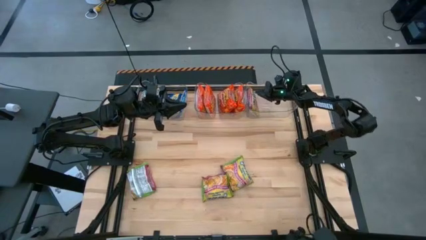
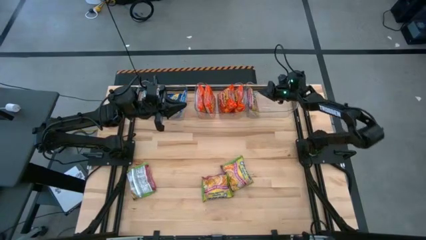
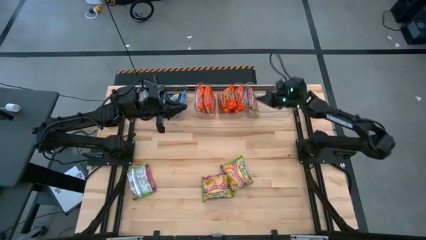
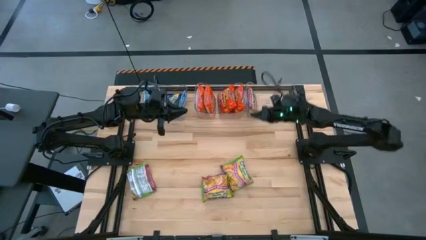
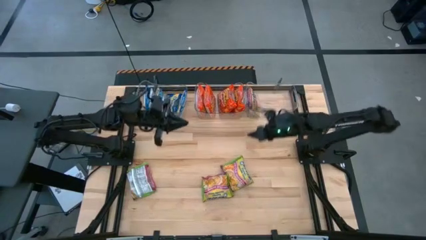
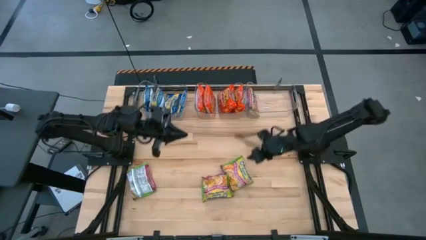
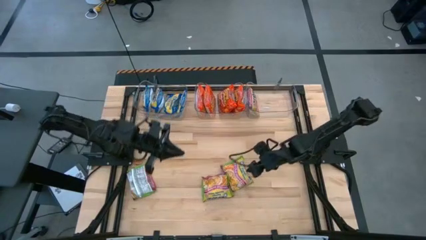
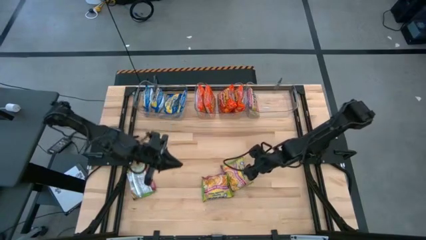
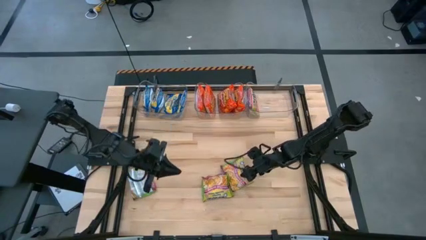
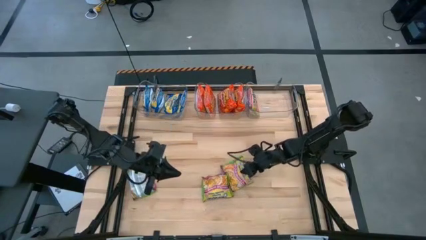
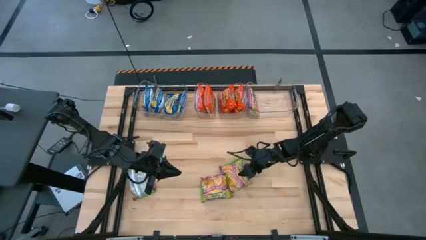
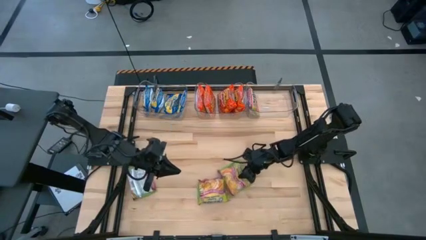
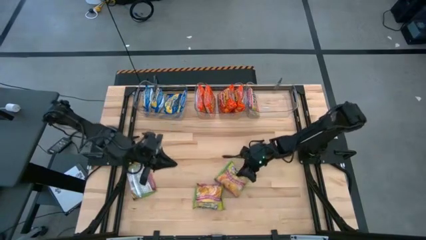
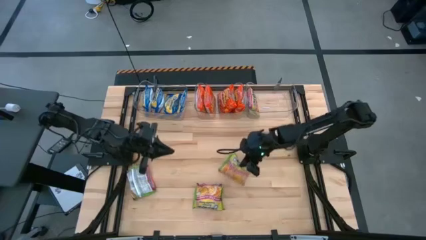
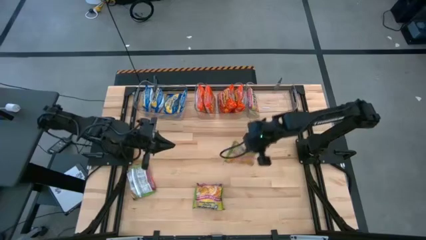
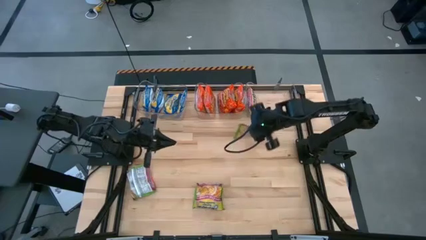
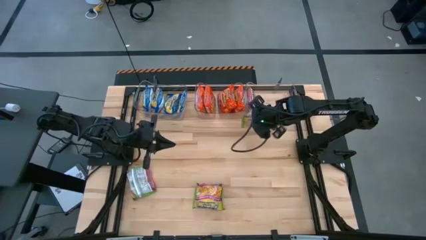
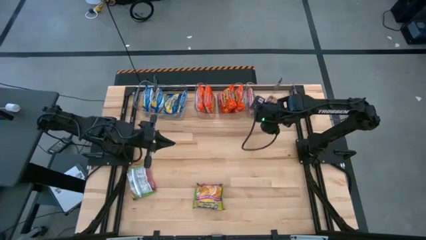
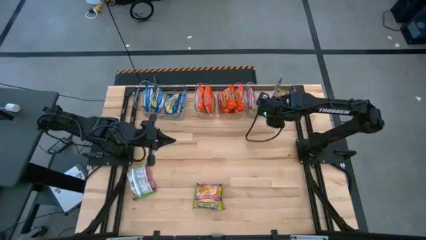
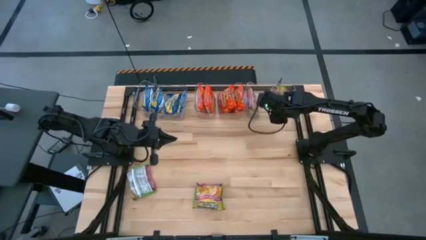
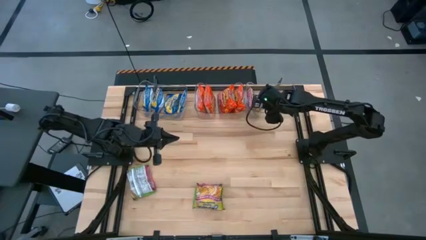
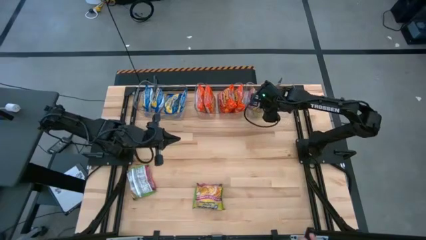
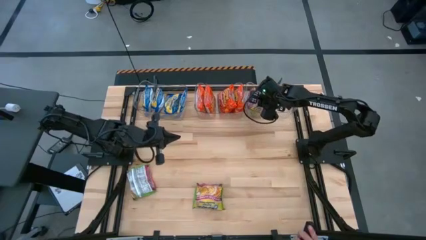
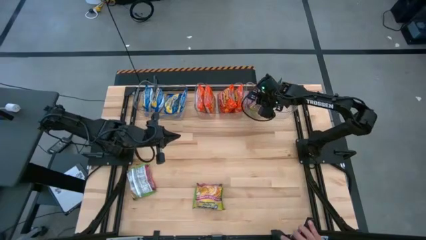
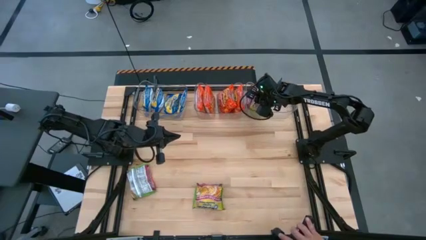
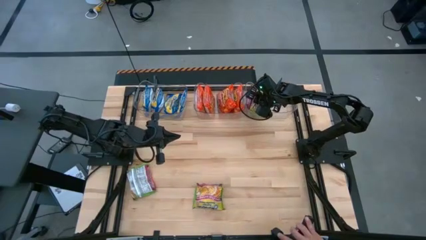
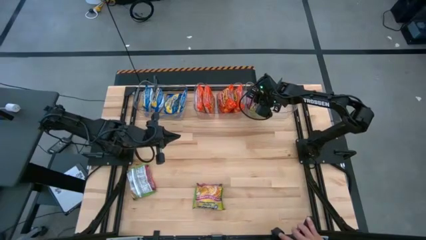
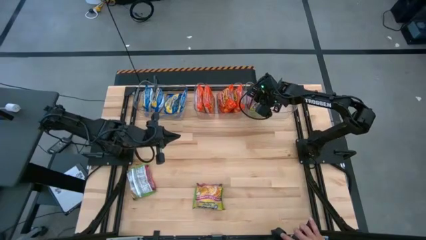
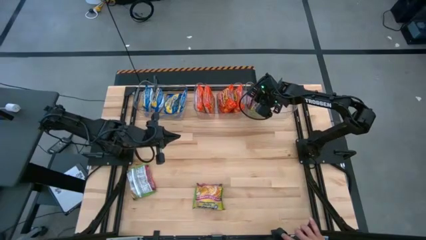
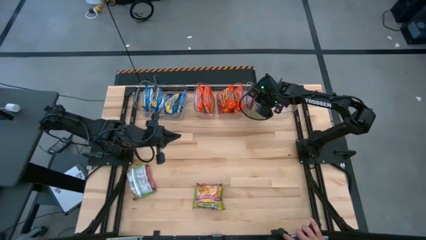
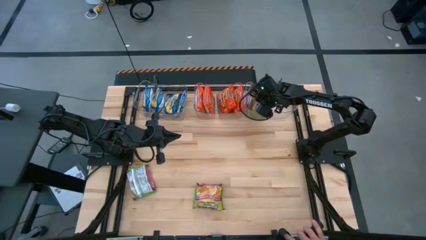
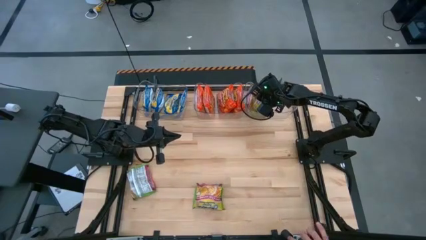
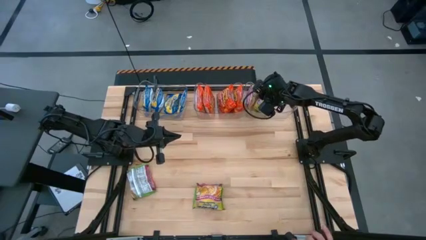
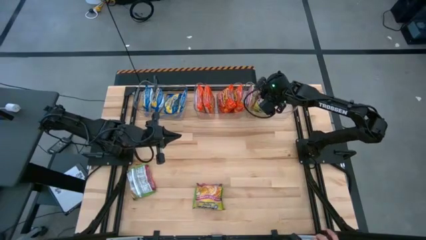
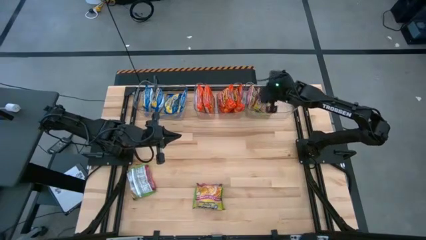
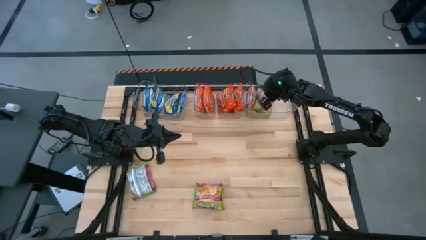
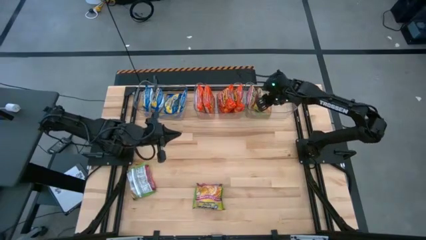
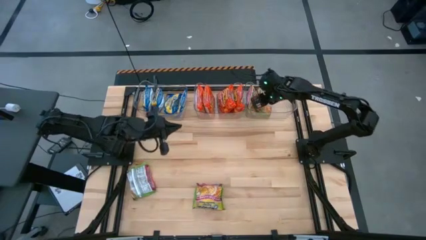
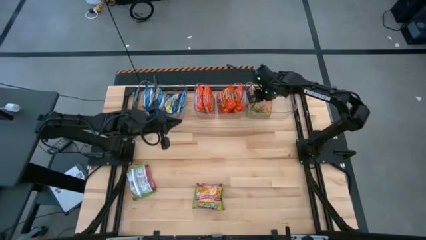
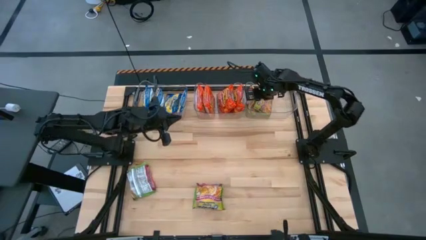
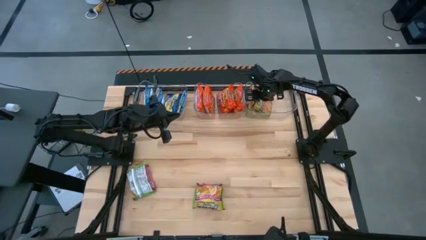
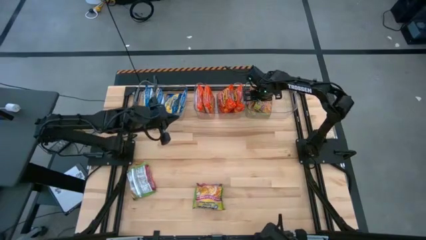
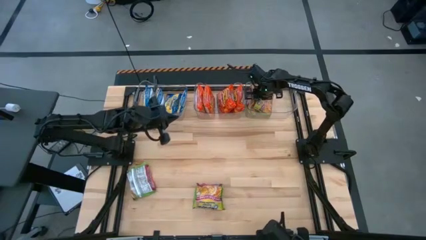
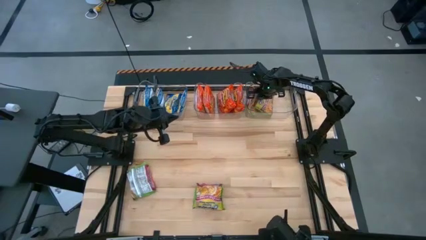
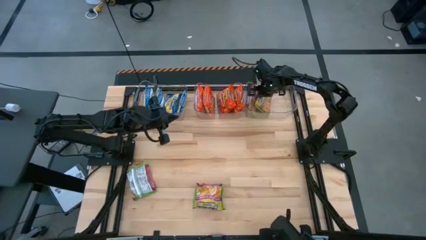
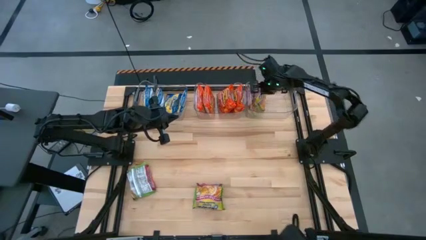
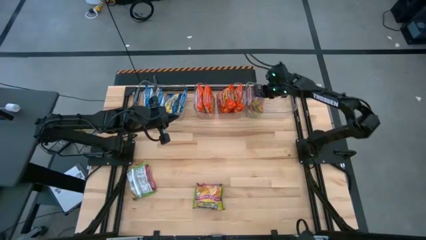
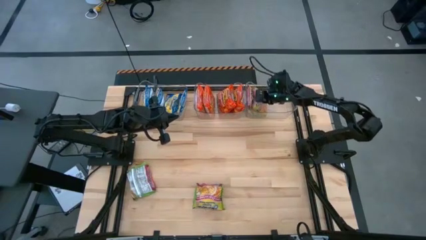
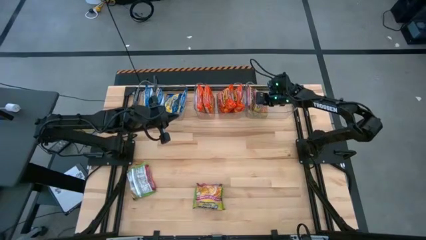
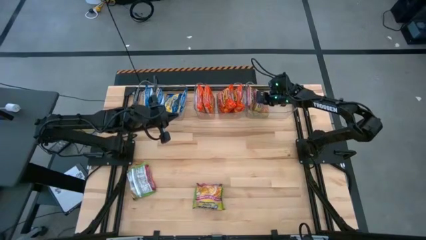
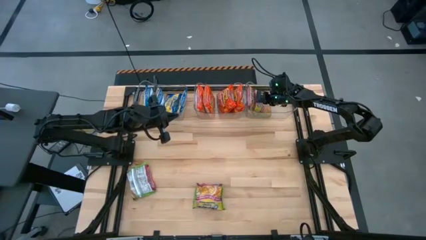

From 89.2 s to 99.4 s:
Task: Sort Maruchan noodles
Put the green noodle pack into the right transparent bin

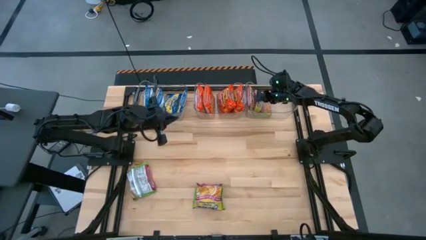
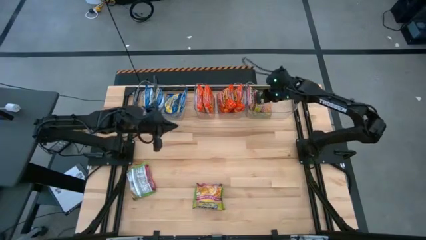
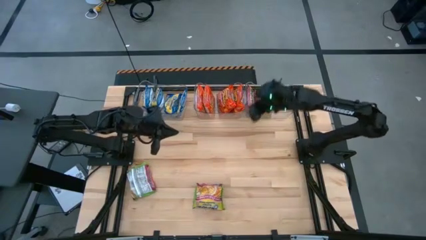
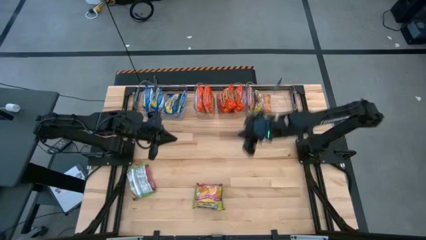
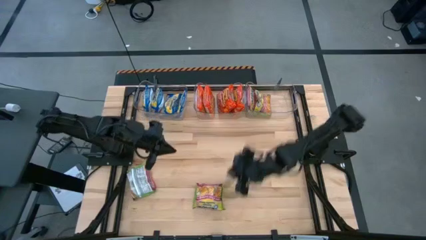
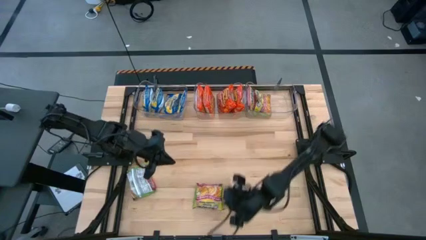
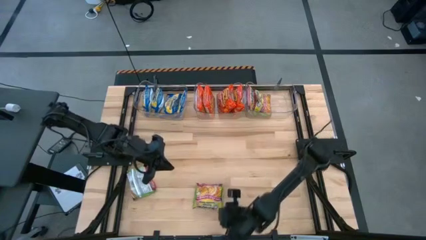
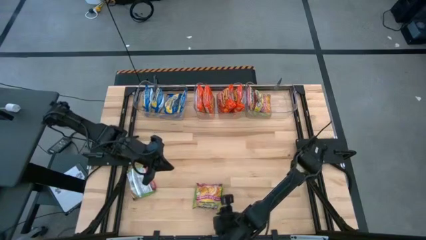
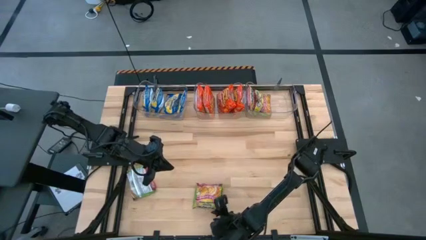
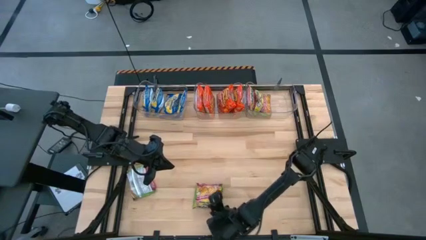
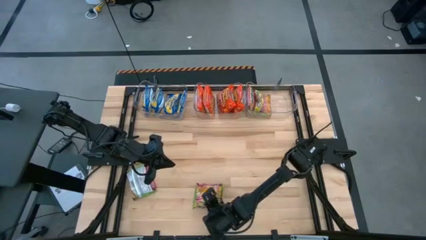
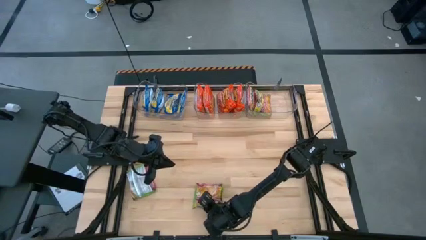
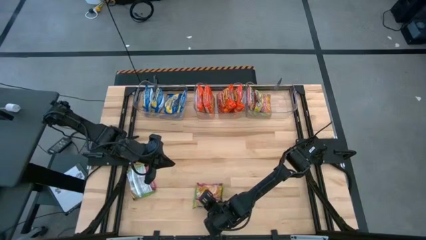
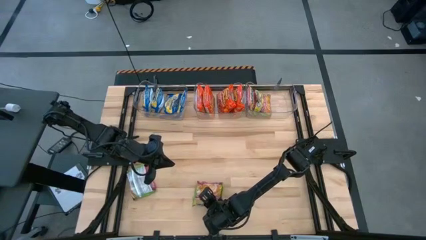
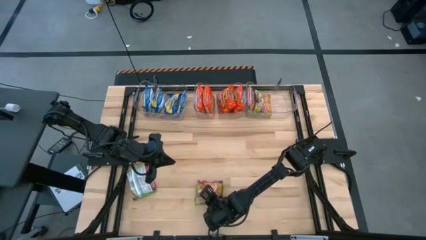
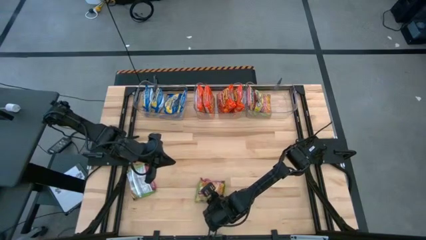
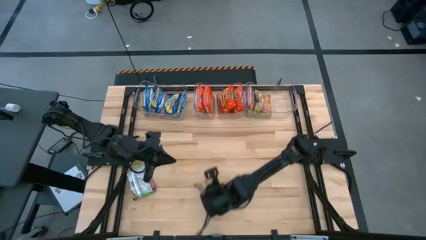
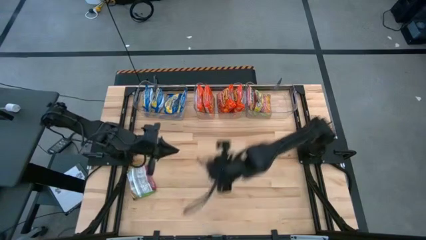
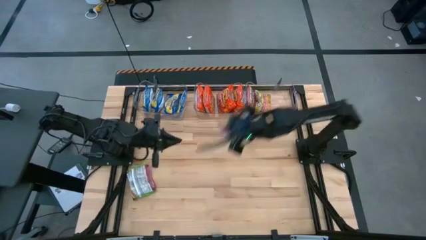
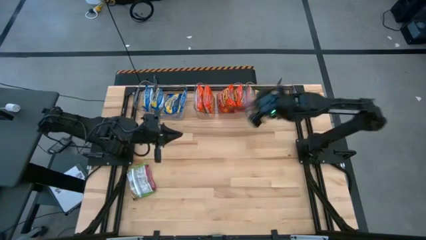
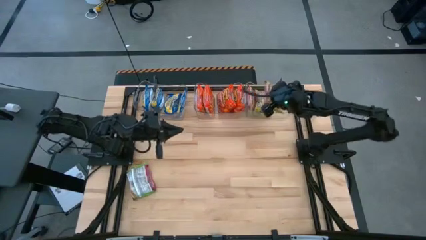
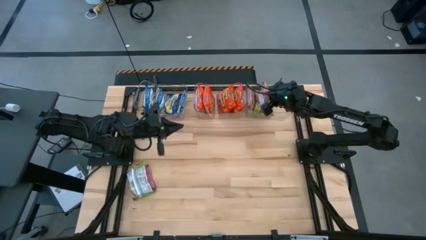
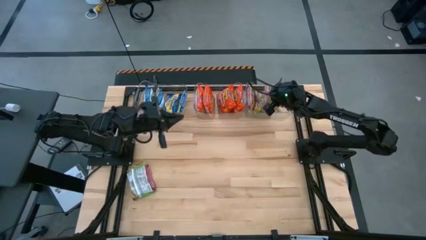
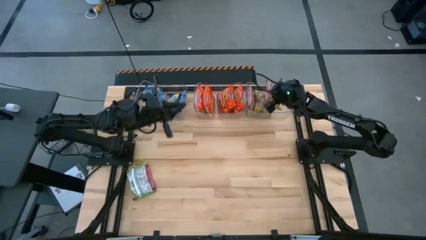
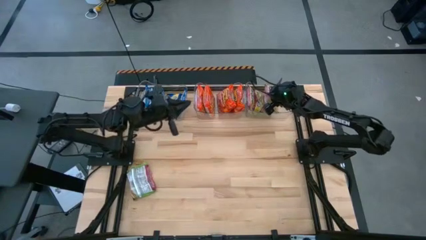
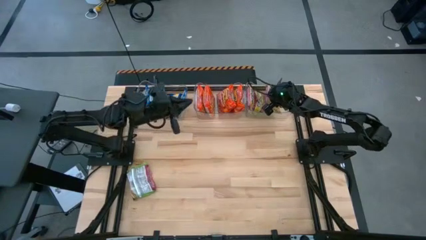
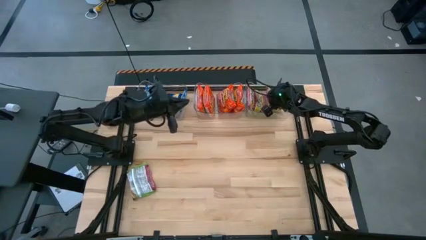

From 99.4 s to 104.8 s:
Put the green noodle pack into the right transparent bin

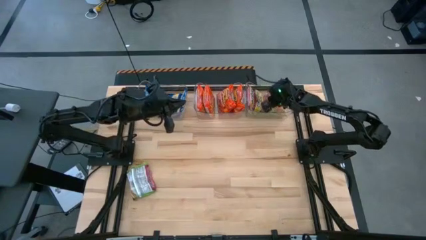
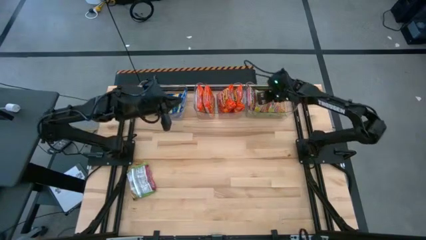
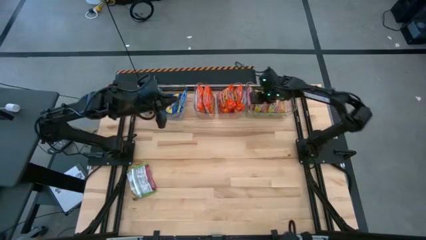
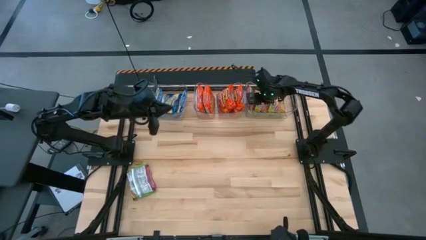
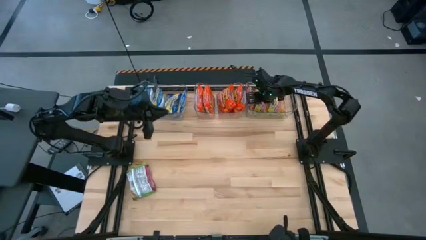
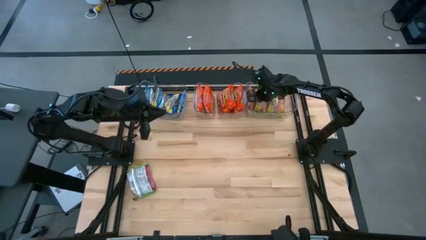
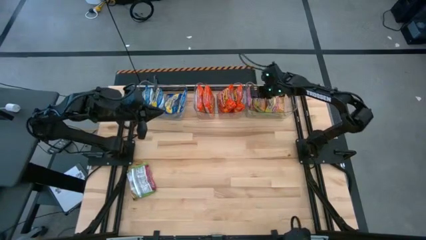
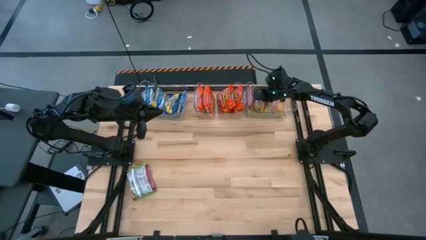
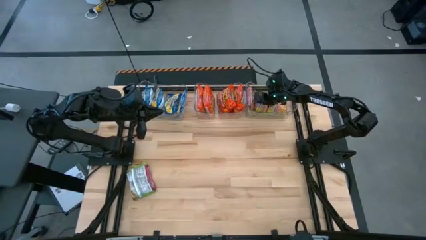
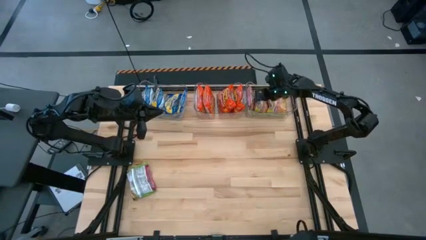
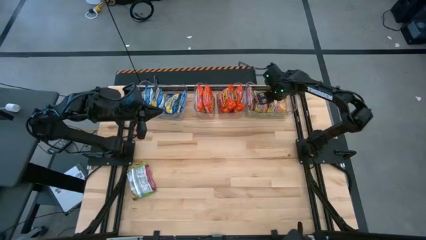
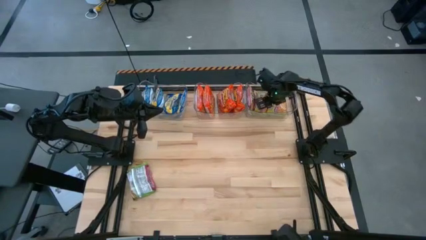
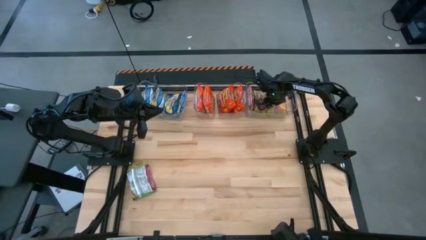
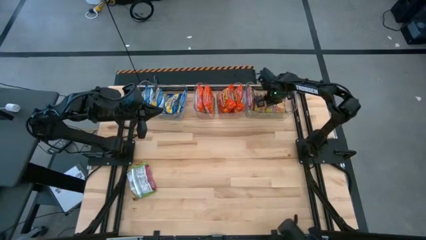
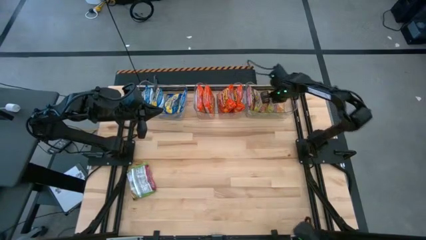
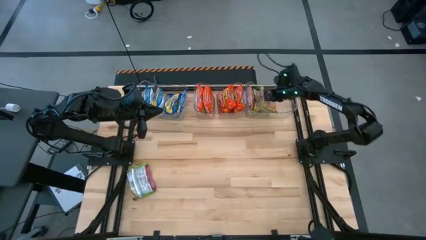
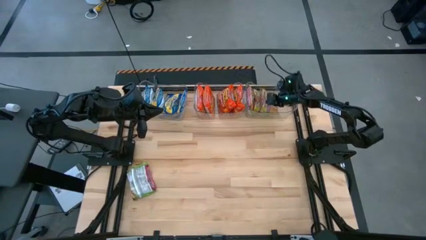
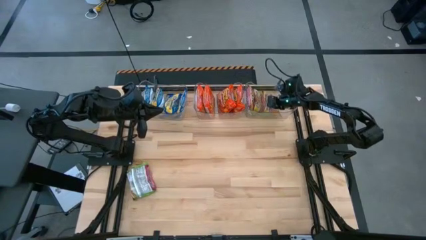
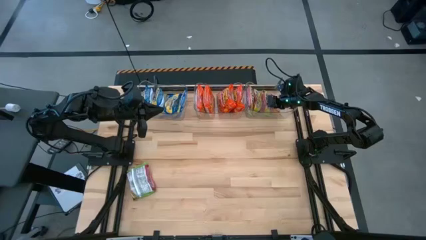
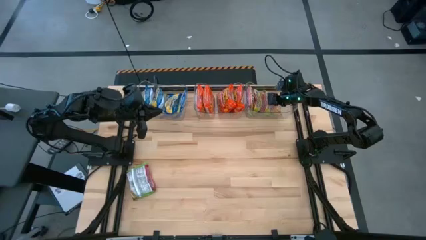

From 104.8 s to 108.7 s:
Adjust the green noodle packs in the right transparent bin
